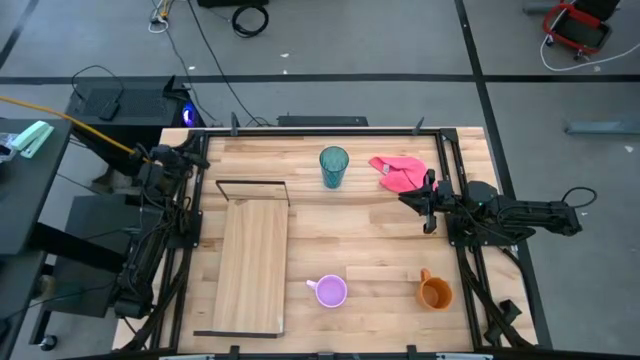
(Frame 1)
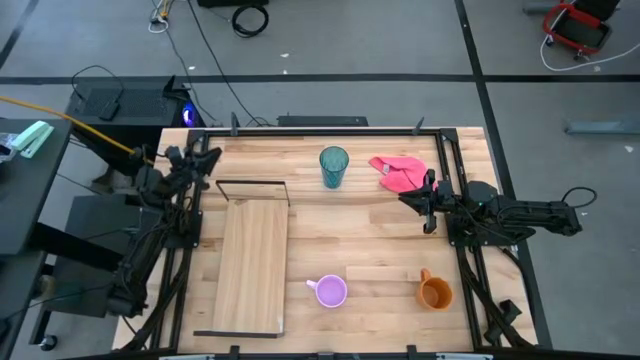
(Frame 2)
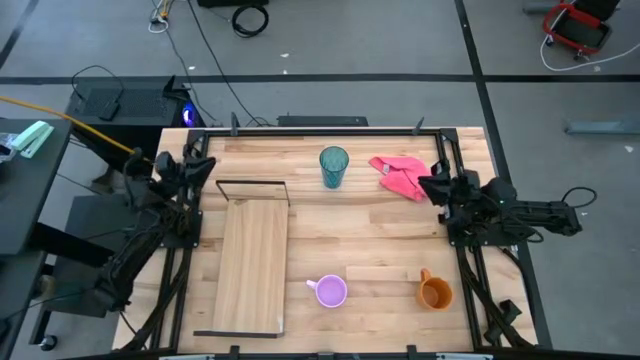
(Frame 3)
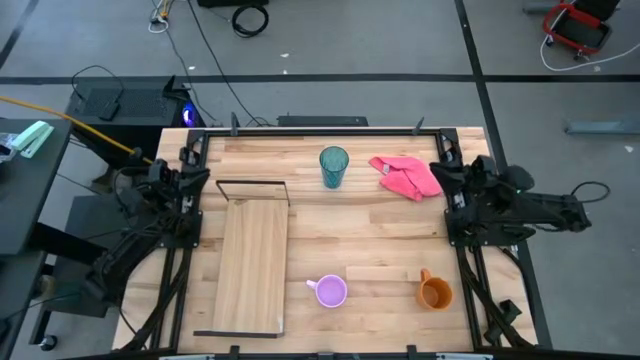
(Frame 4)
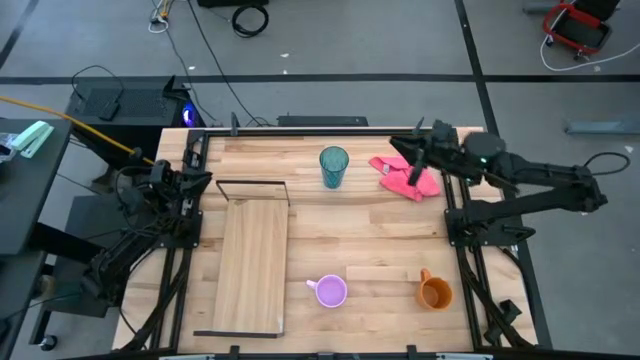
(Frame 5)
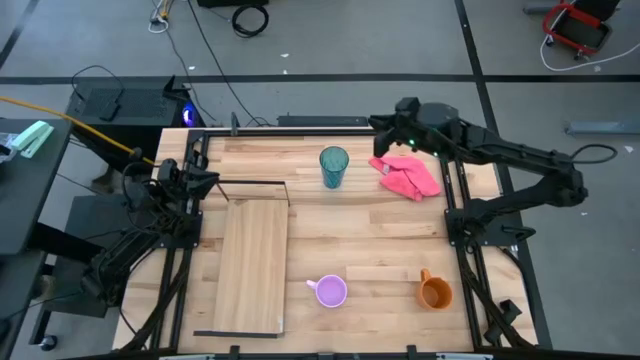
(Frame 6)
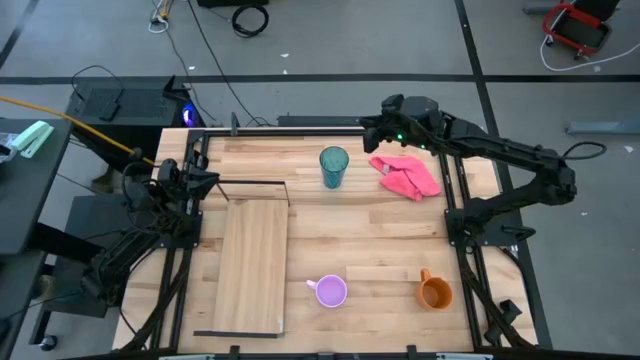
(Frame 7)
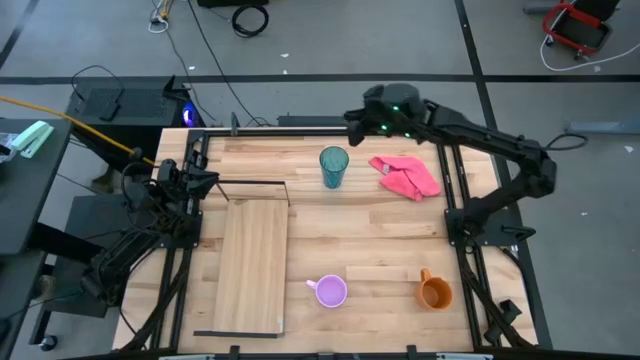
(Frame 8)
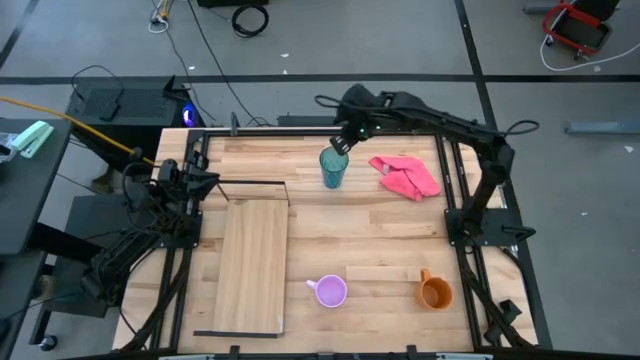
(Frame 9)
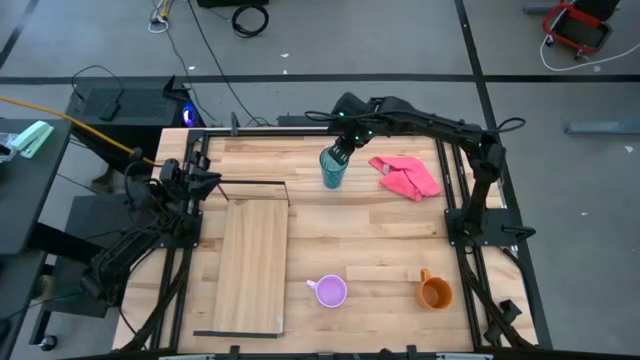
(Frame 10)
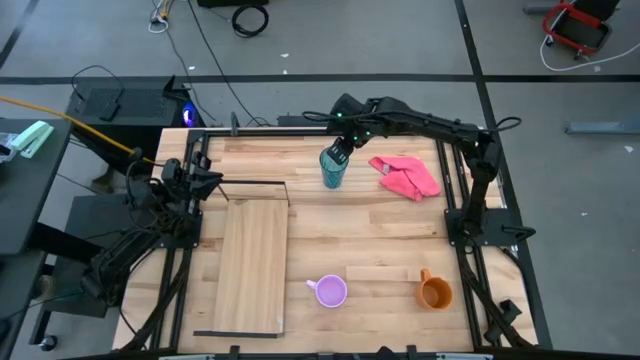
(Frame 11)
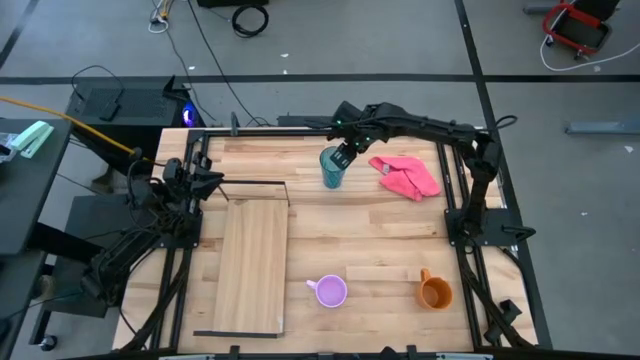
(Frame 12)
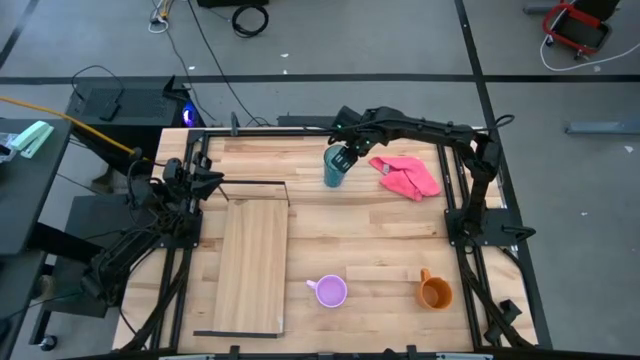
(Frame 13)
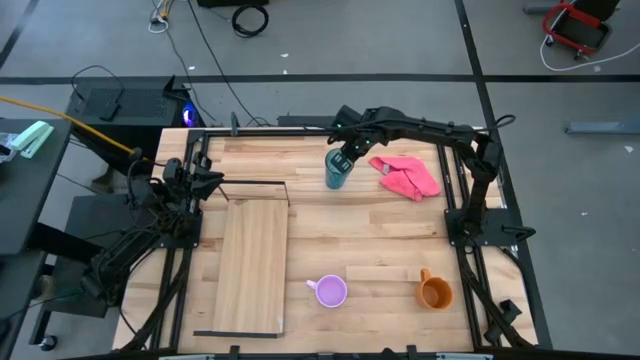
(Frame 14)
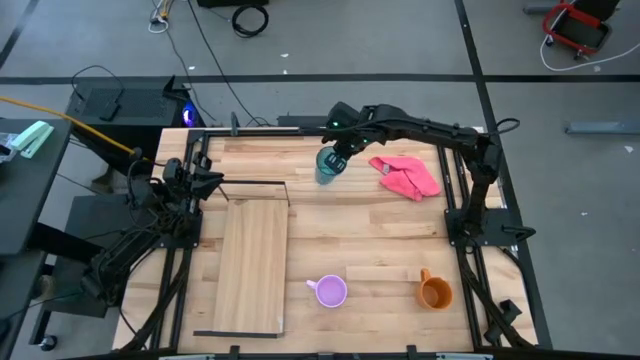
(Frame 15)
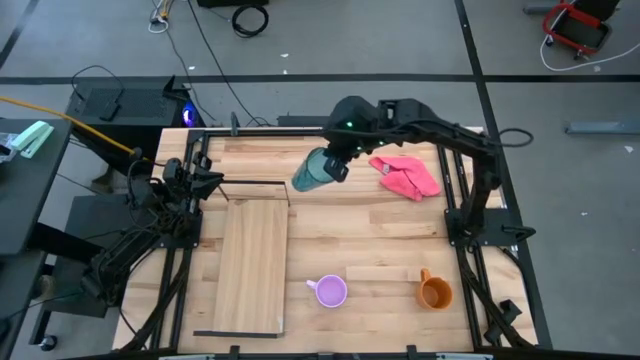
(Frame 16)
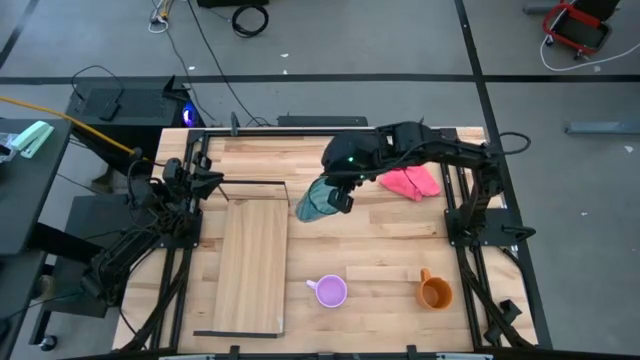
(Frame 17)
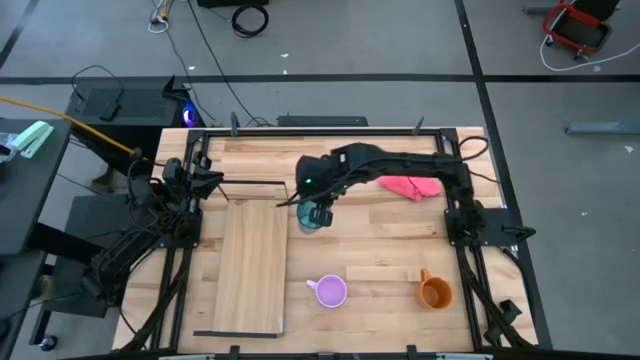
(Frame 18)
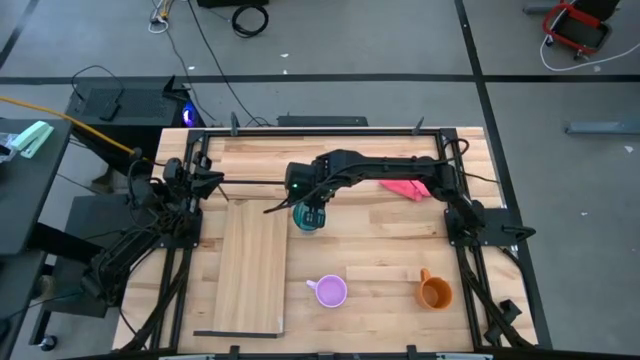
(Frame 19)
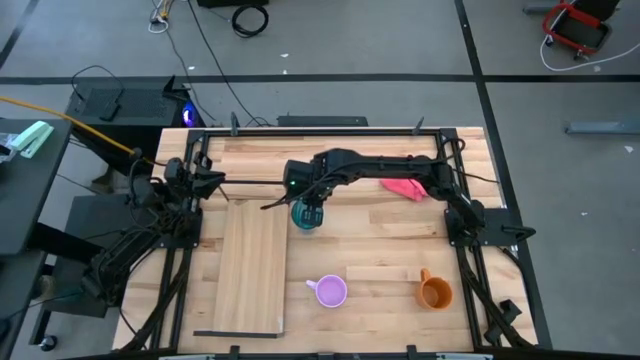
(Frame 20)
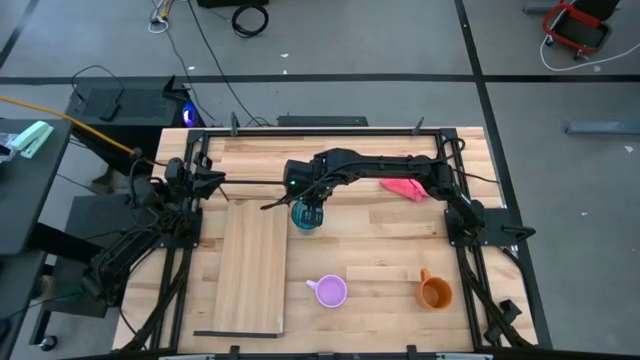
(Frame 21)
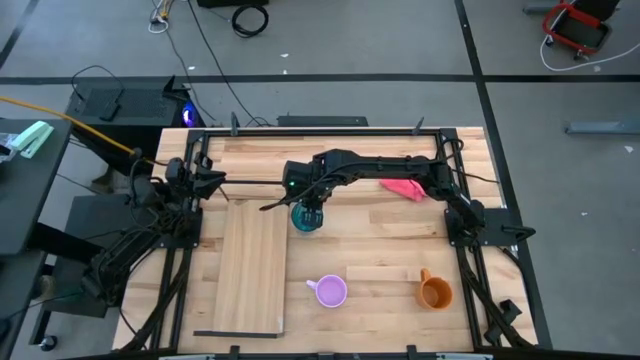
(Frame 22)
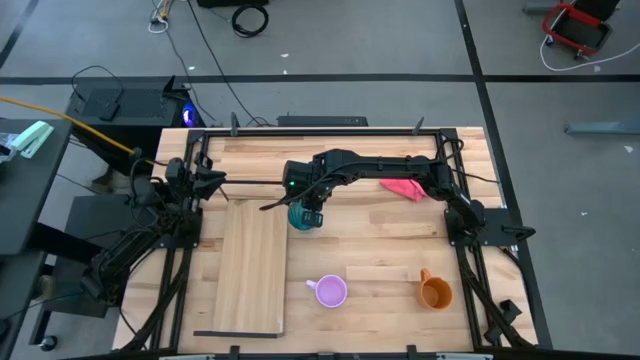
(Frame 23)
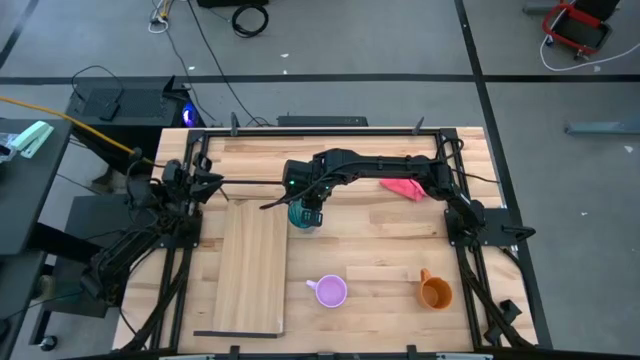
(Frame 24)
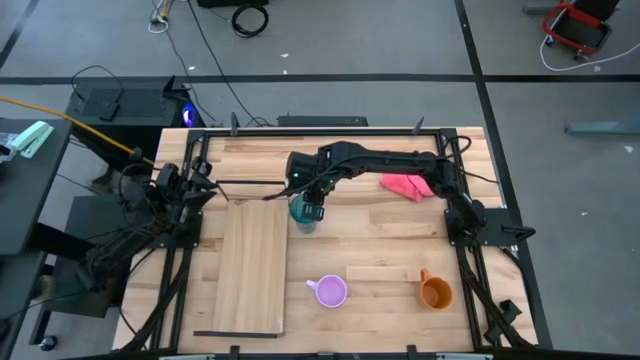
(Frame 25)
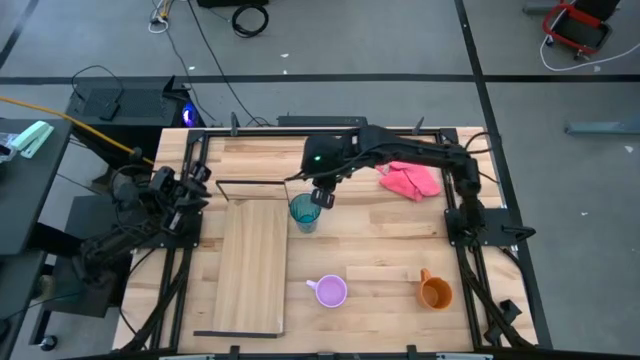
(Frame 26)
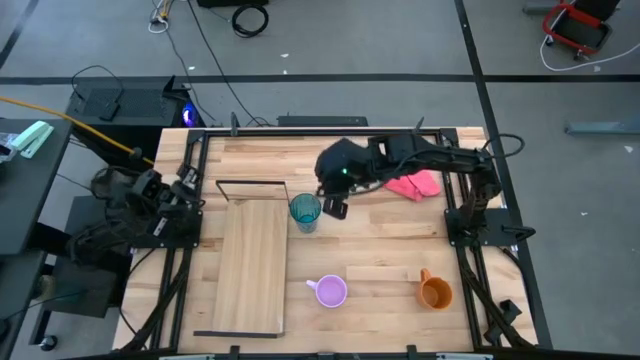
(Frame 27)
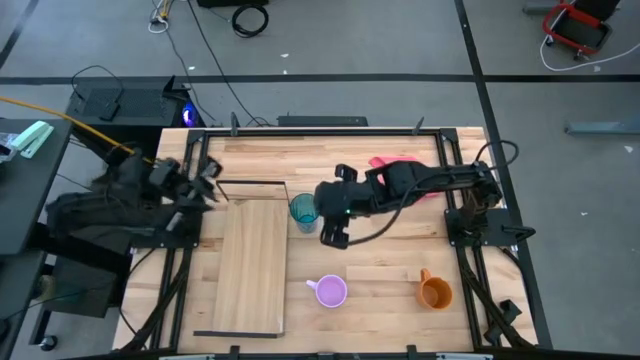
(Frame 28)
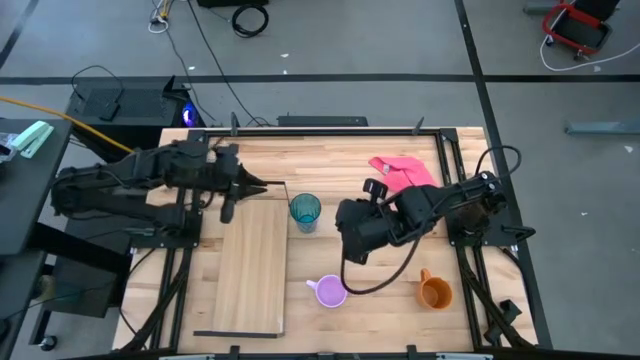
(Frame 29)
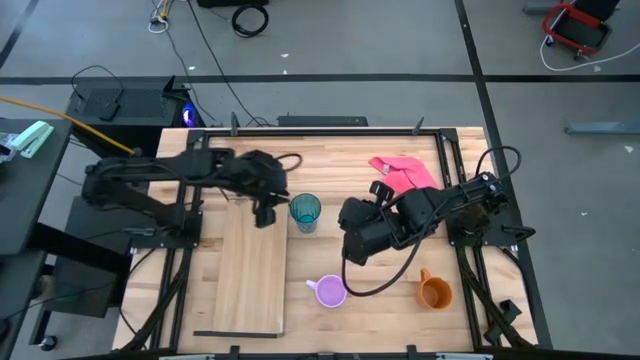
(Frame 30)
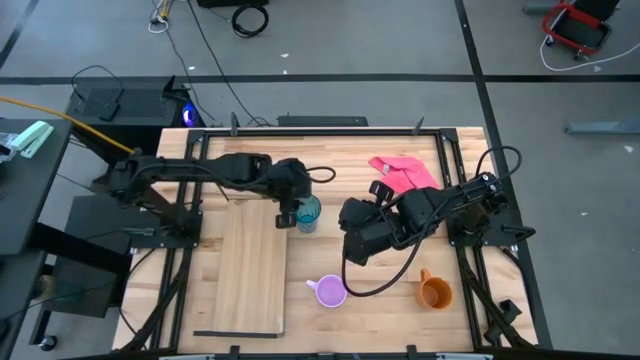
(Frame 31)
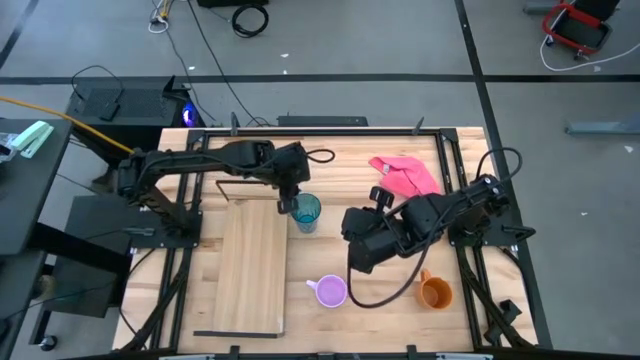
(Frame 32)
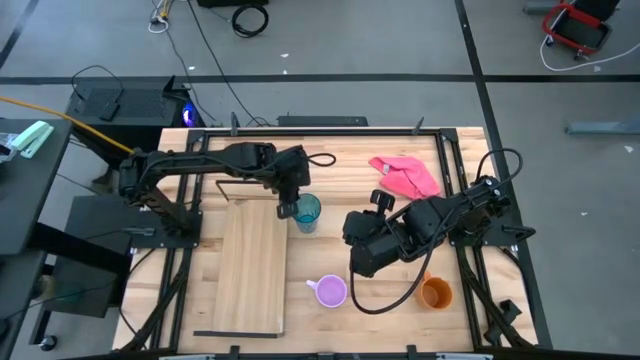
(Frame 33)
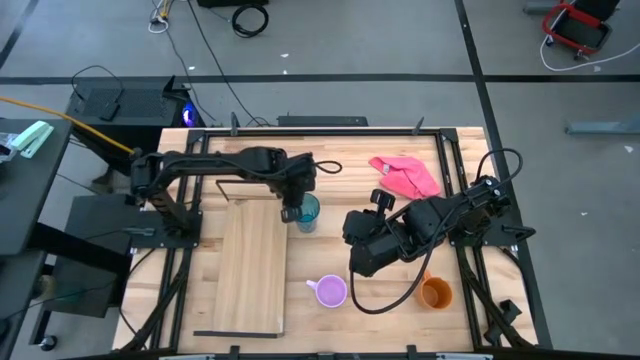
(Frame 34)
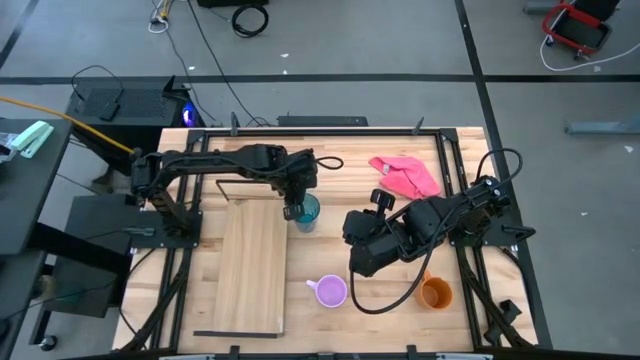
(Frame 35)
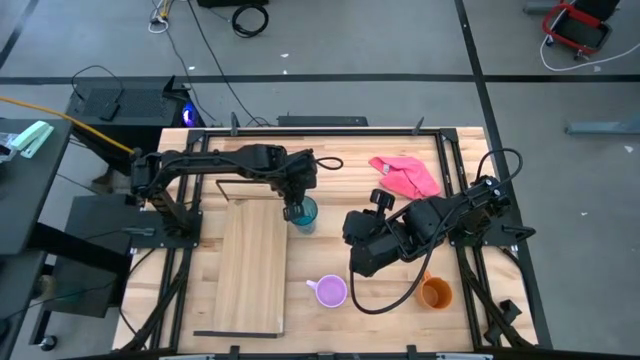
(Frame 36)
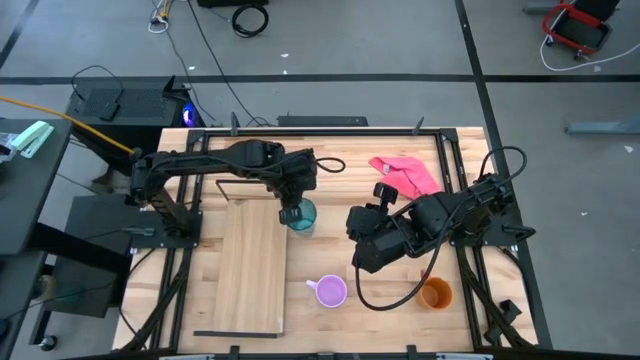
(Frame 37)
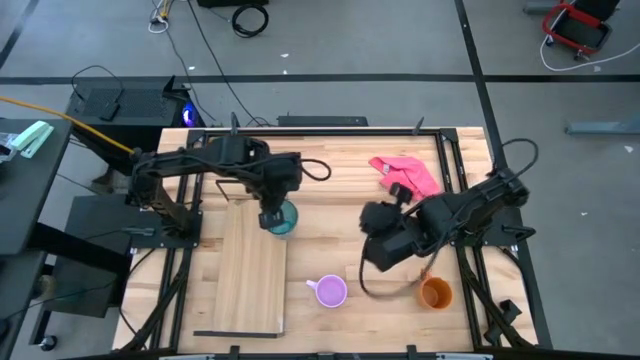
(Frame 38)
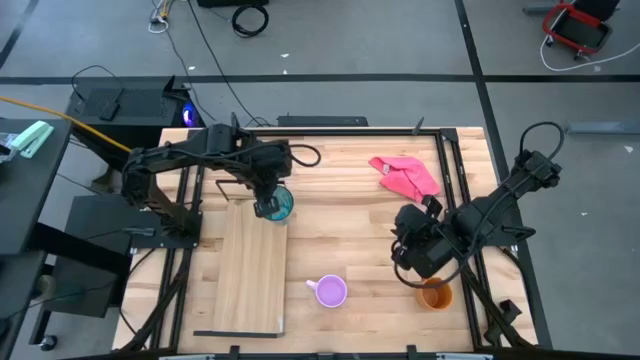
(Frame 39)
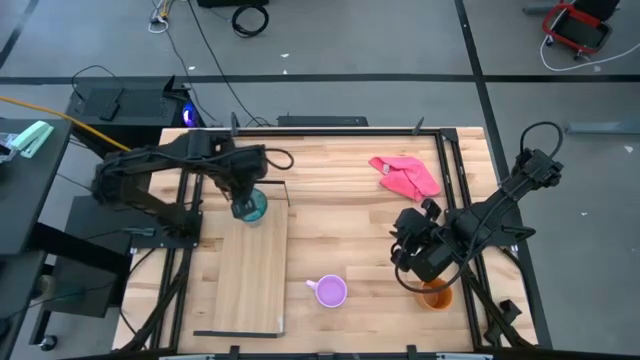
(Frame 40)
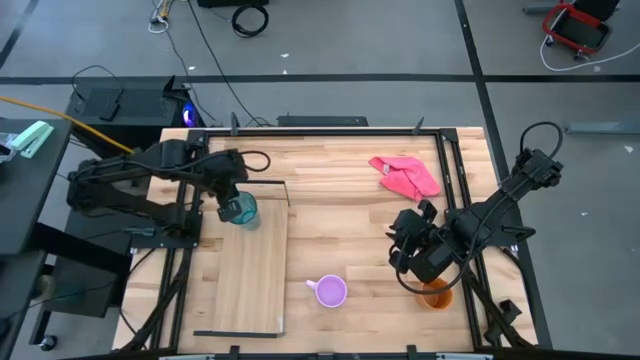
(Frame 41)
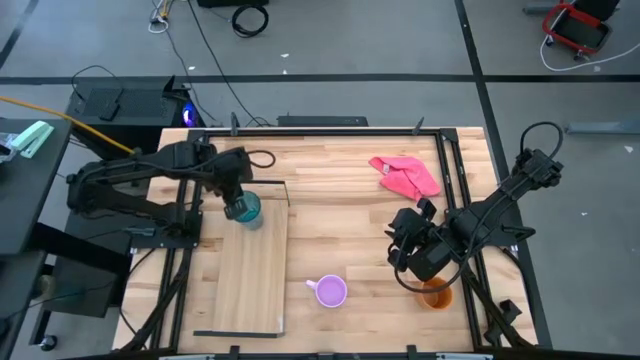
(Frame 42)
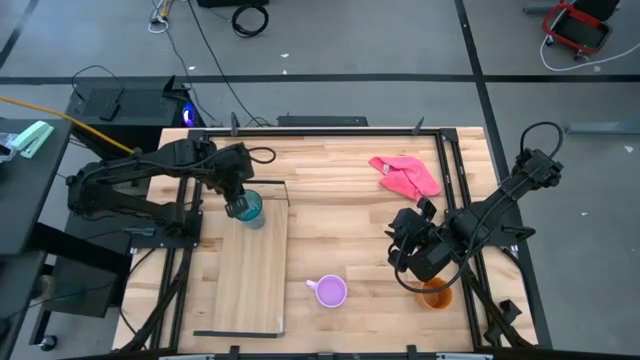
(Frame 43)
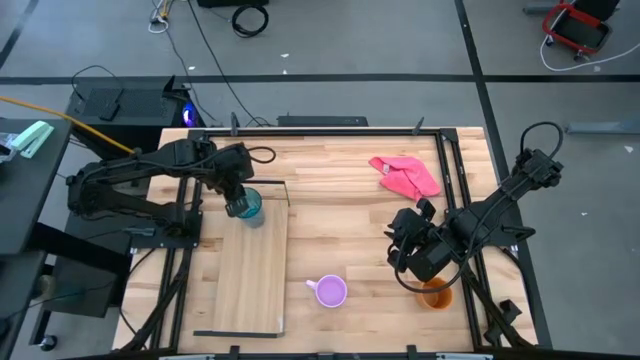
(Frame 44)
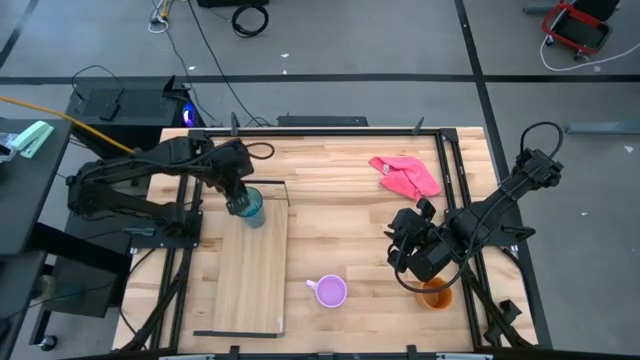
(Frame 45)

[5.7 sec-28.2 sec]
Task: Stack small to large cups/mugs on shelf
Put the blue glass on the shelf
